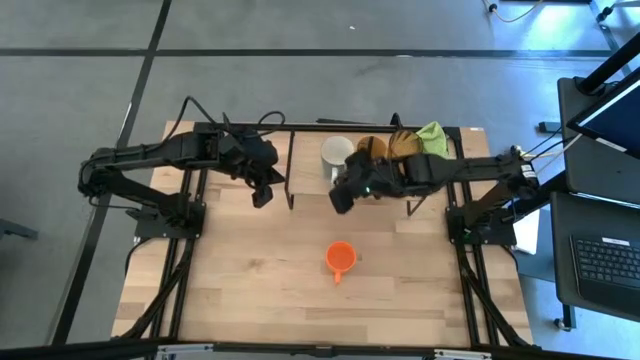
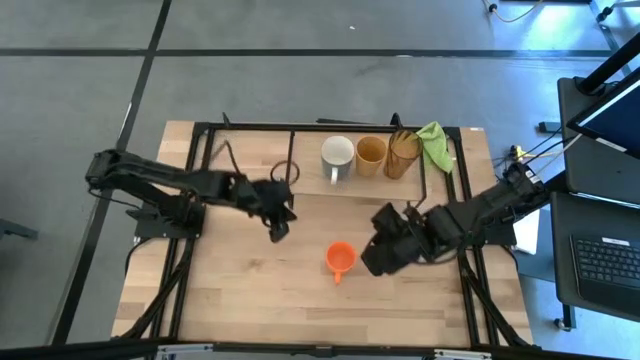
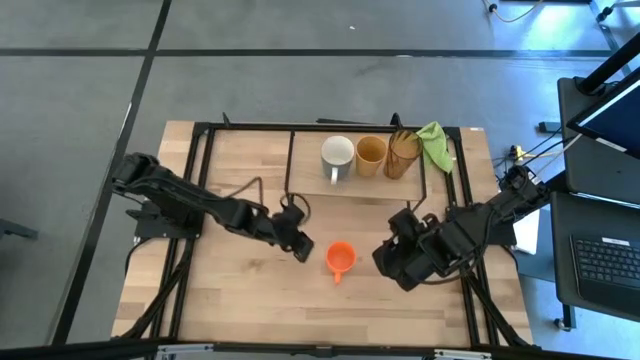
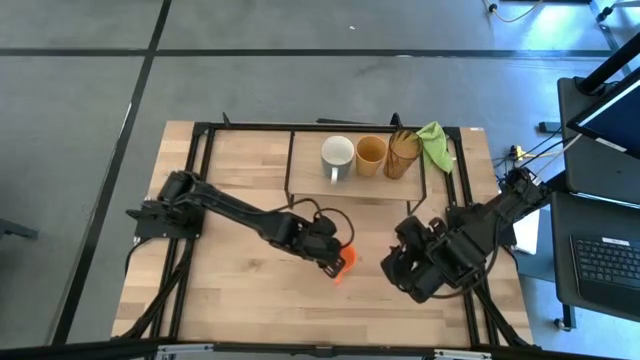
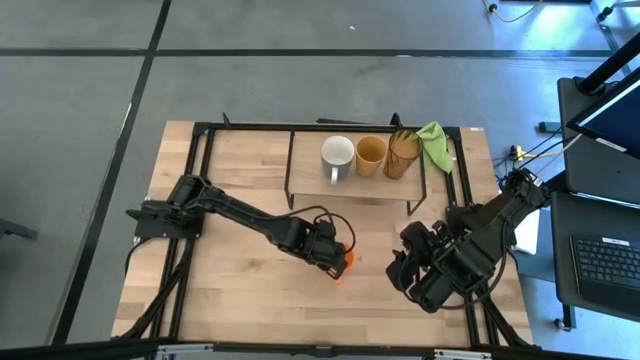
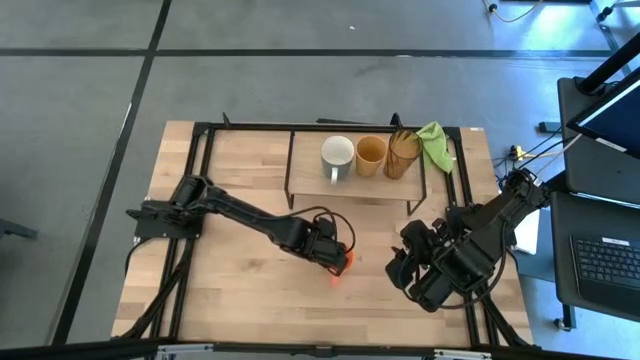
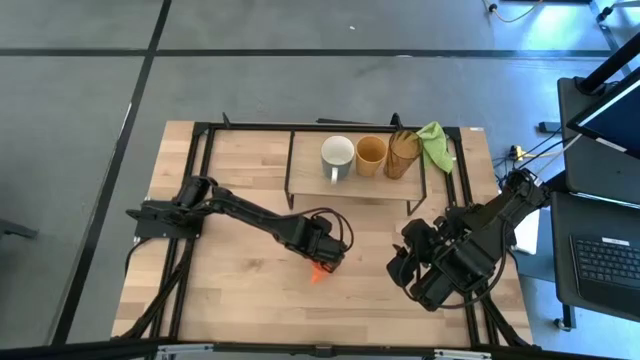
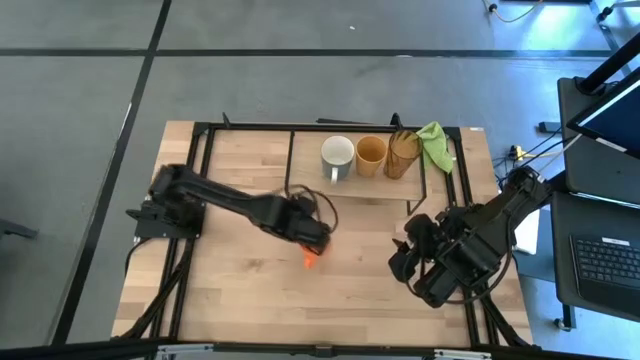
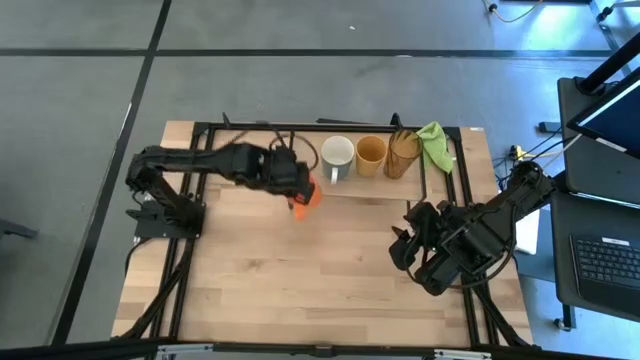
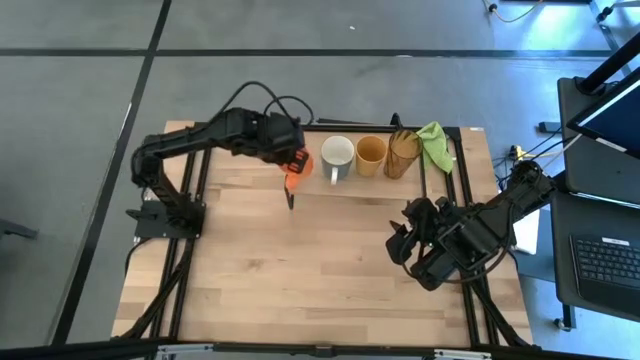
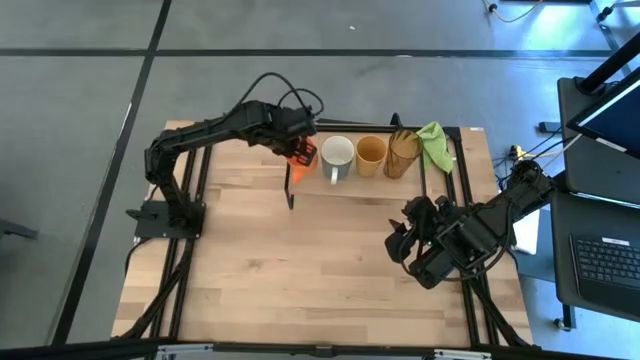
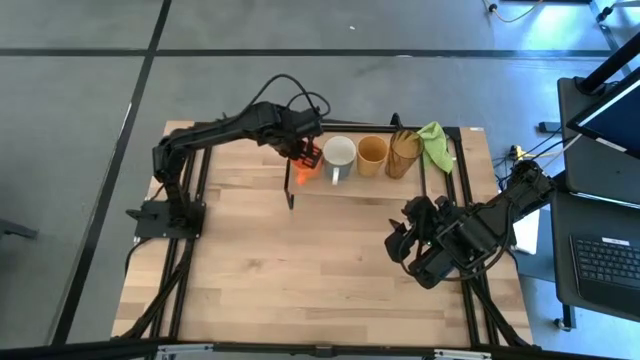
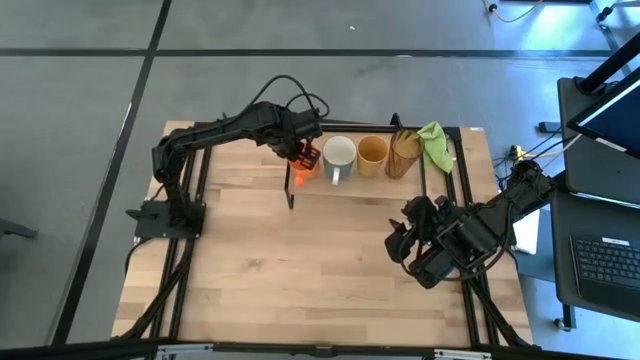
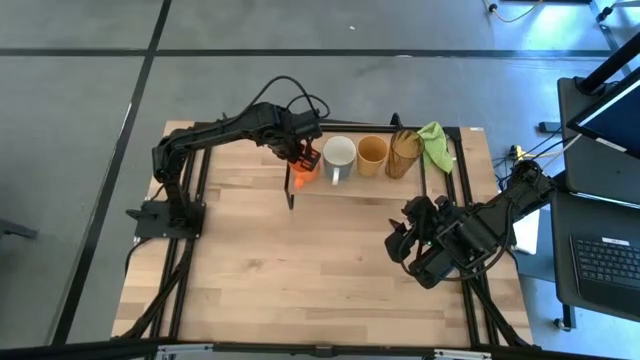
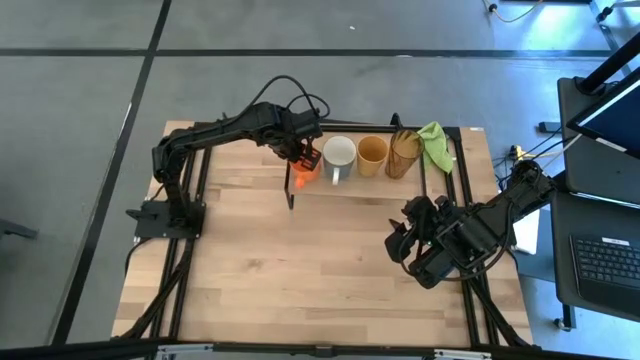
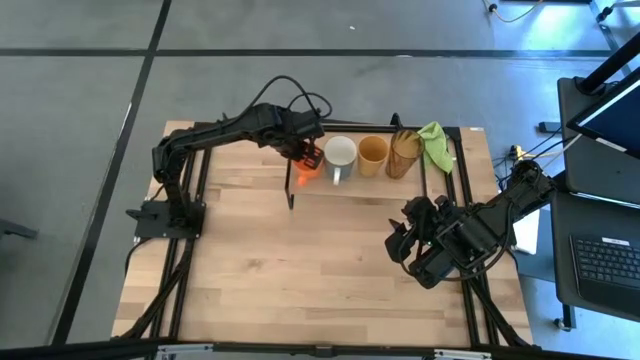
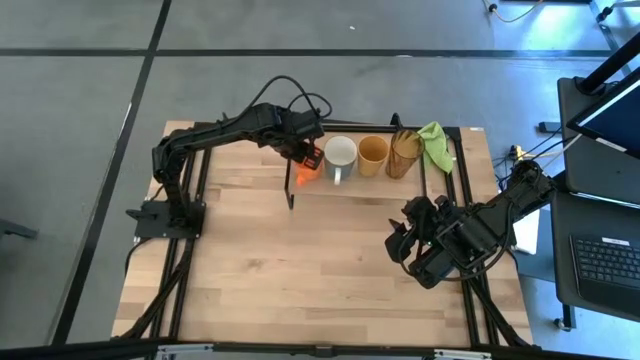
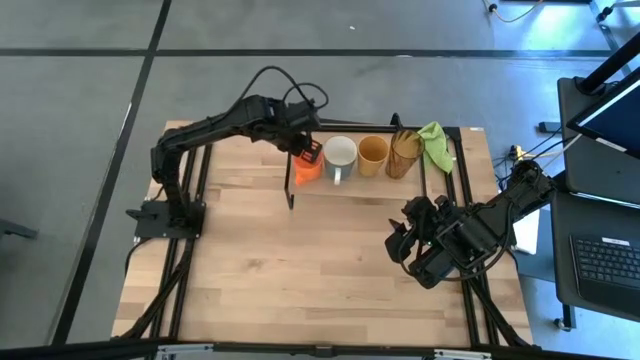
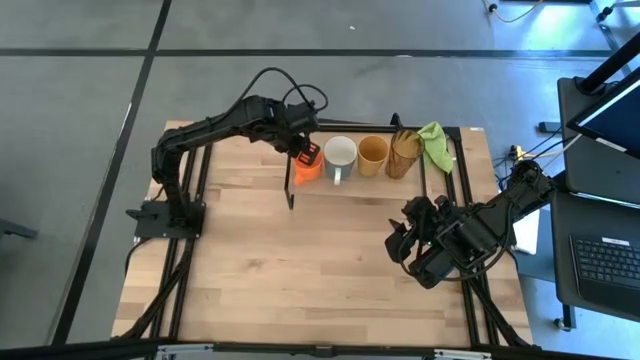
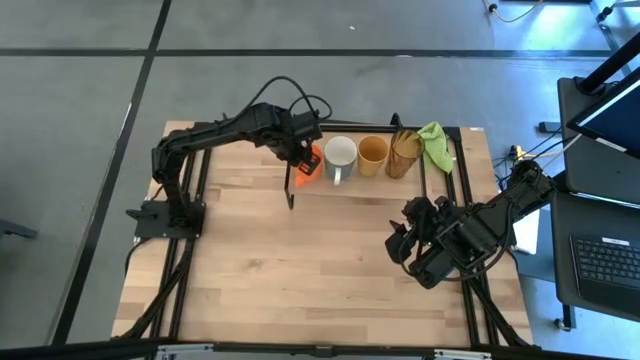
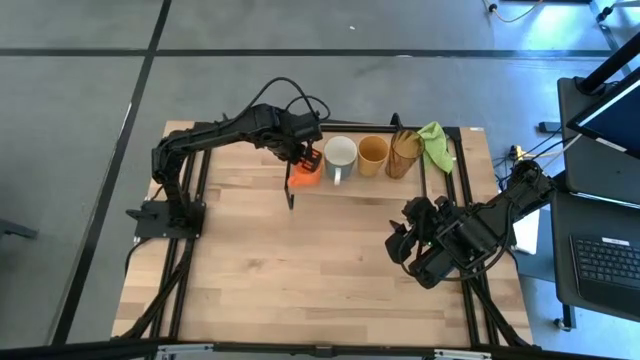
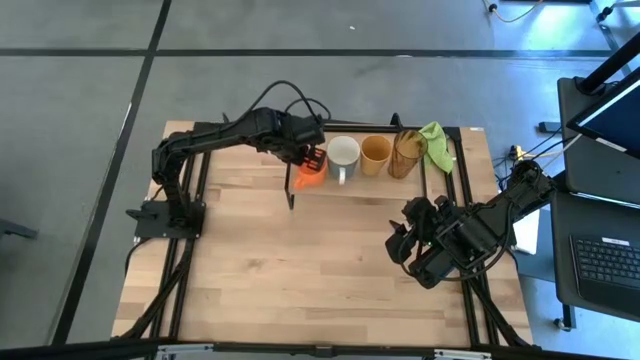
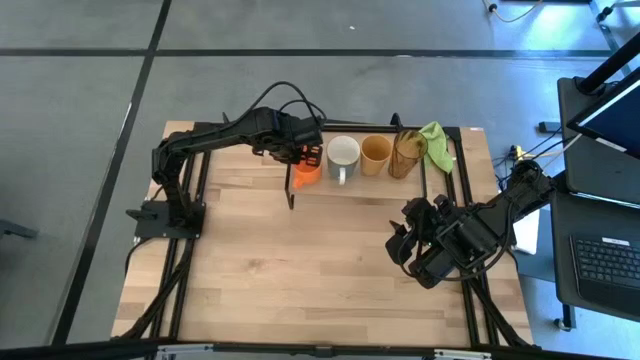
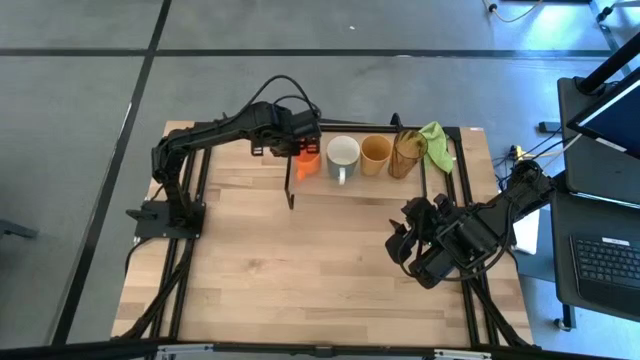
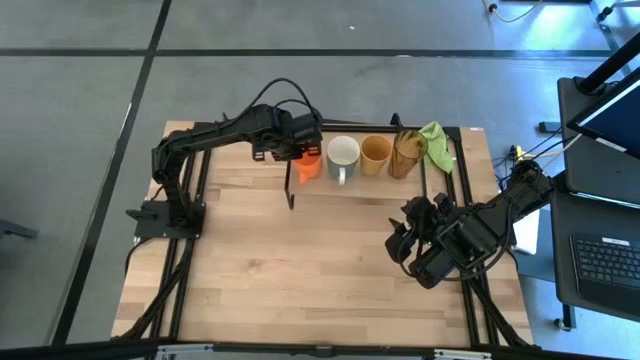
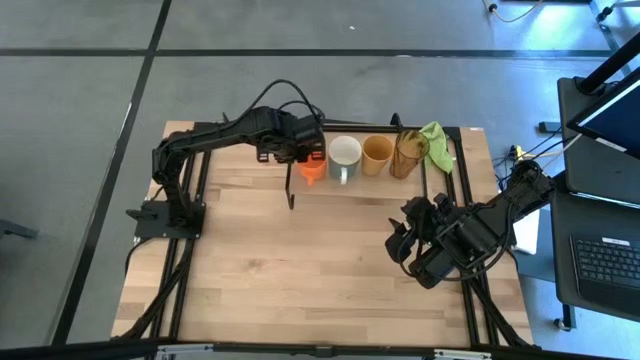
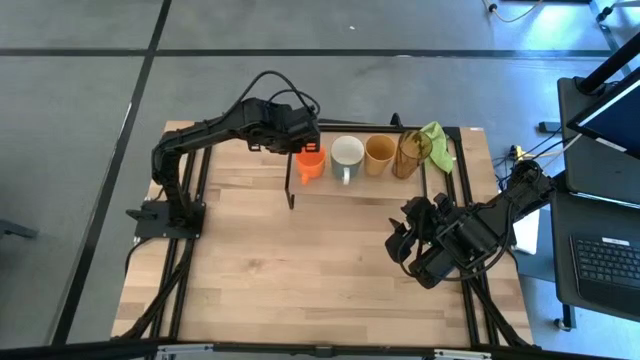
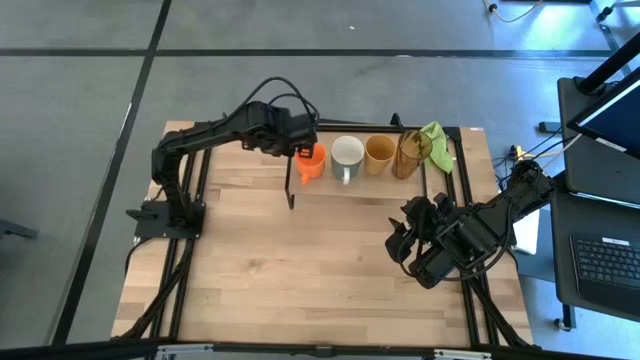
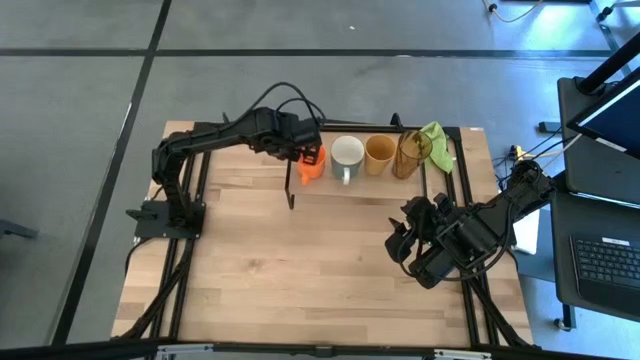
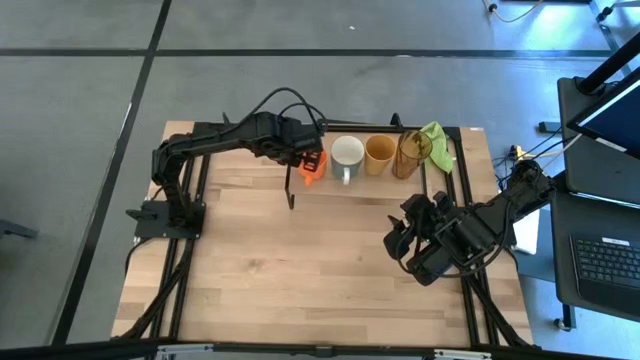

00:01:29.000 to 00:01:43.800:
Task: Stack small to large cups/mugs on shelf
Put the orange mug on the shelf

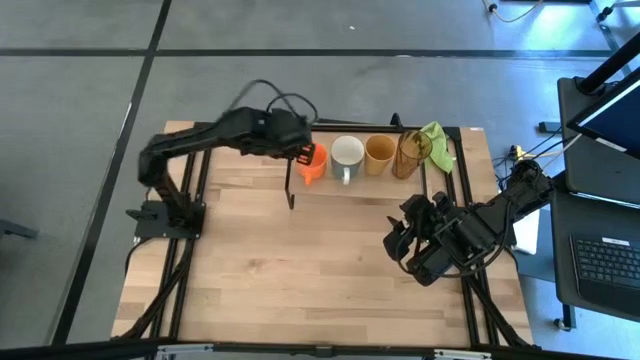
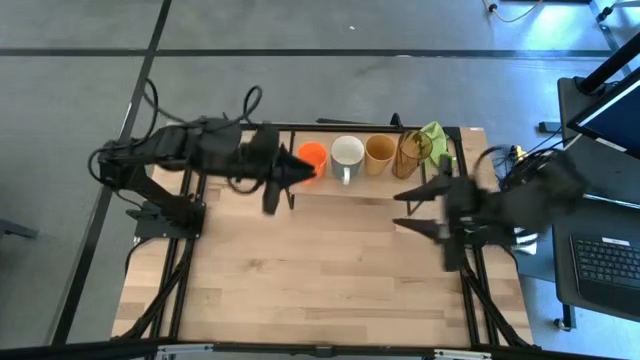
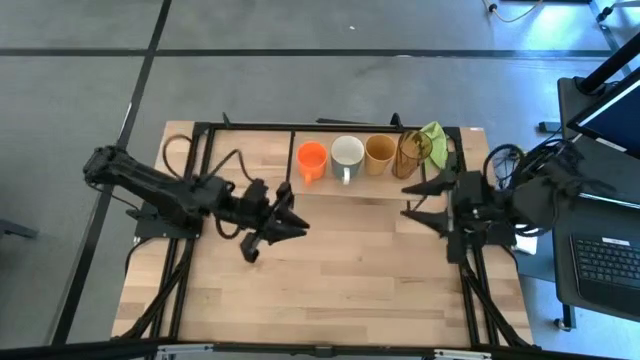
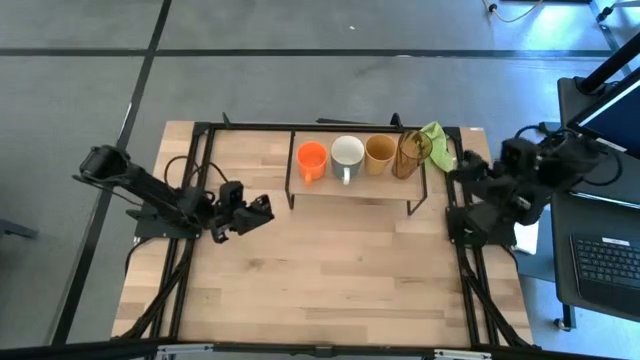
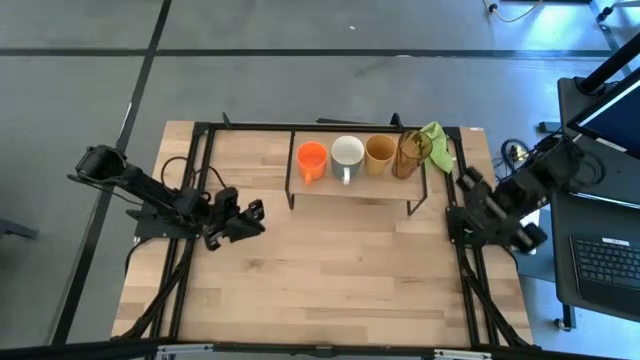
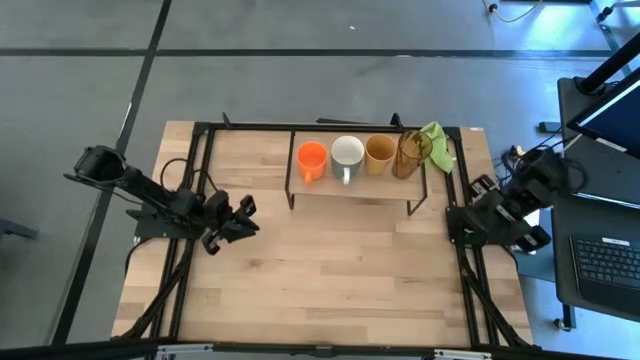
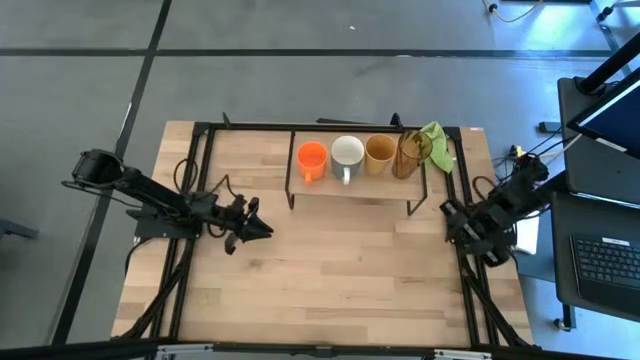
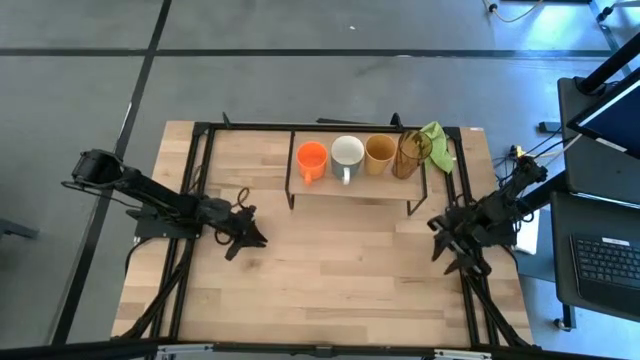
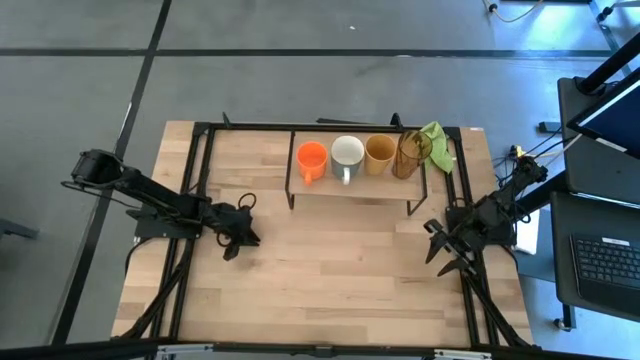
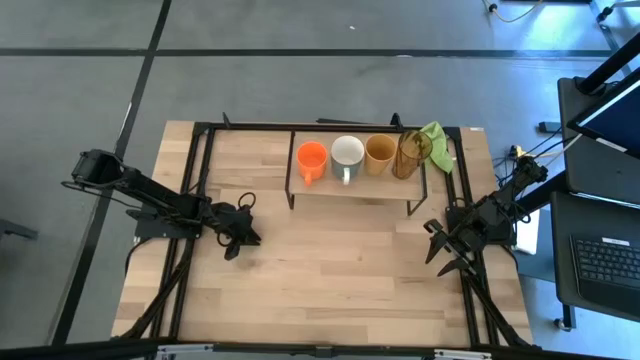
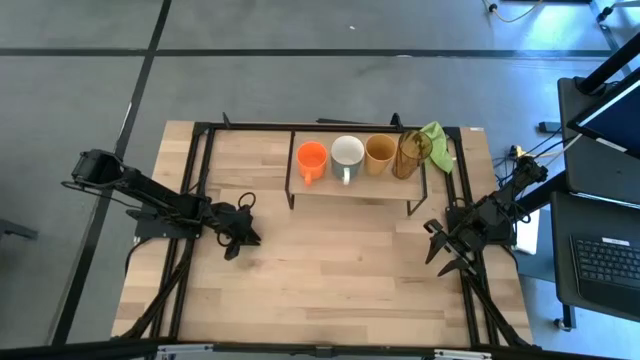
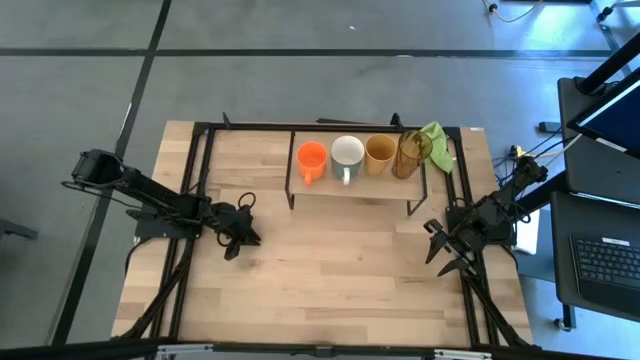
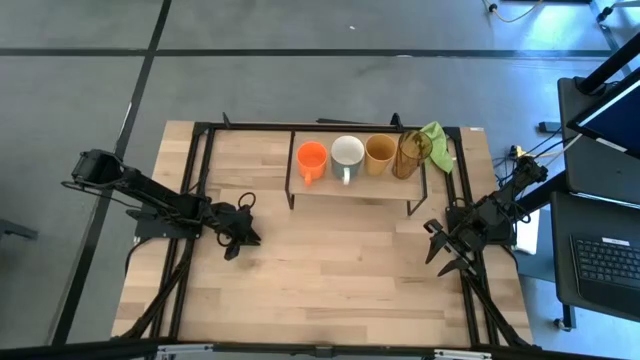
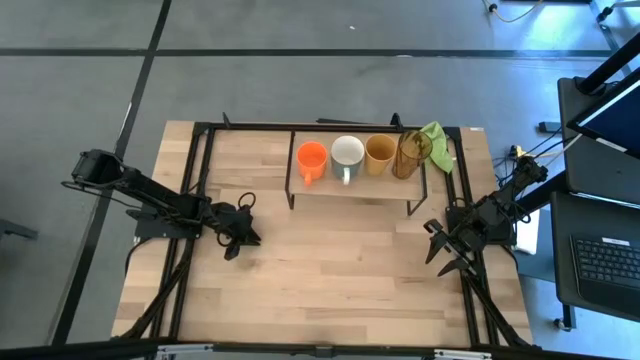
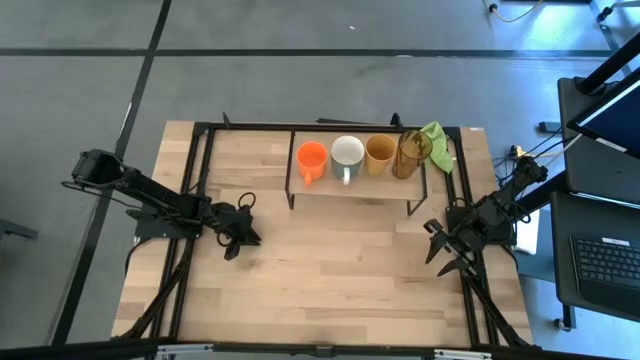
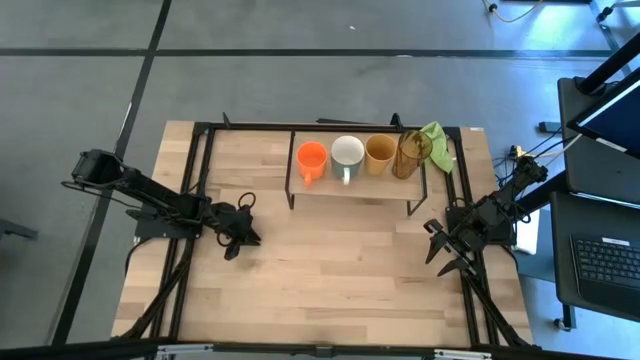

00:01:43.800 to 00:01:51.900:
Return to Home Position
